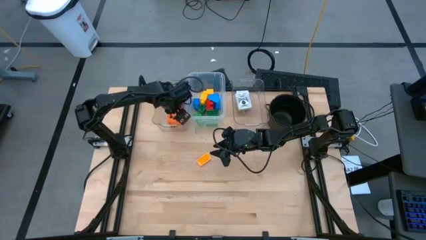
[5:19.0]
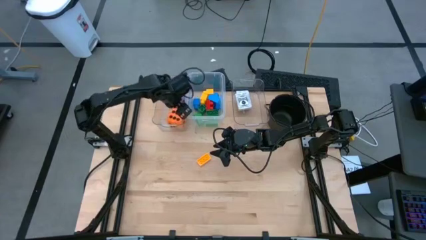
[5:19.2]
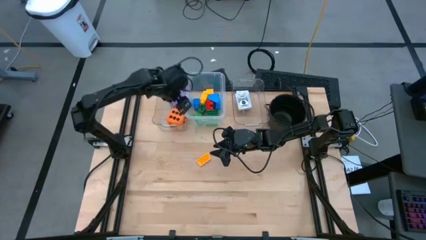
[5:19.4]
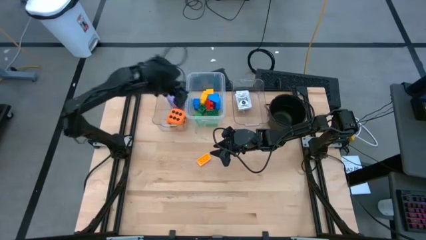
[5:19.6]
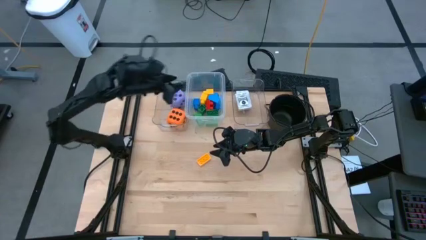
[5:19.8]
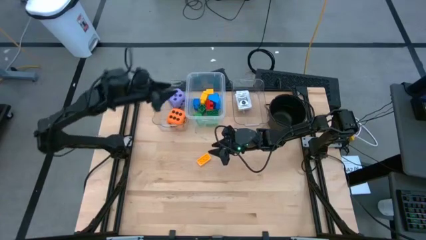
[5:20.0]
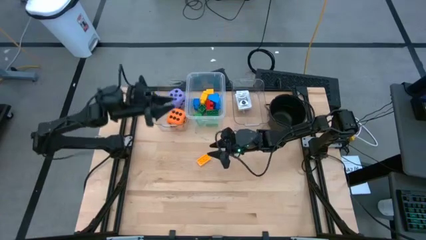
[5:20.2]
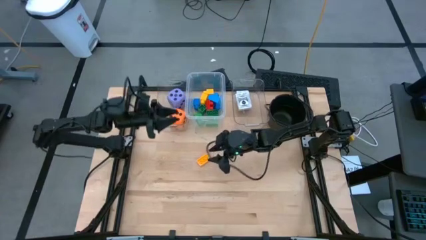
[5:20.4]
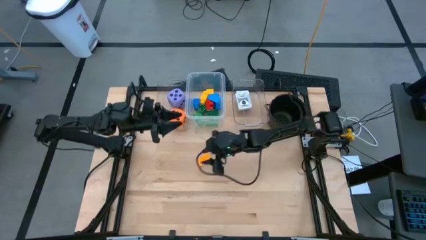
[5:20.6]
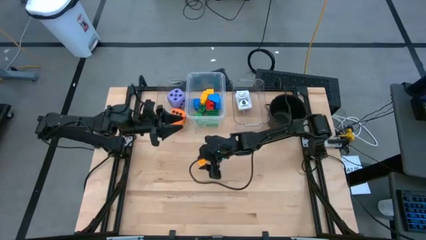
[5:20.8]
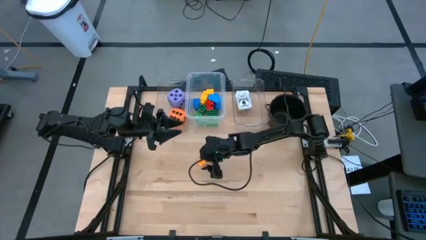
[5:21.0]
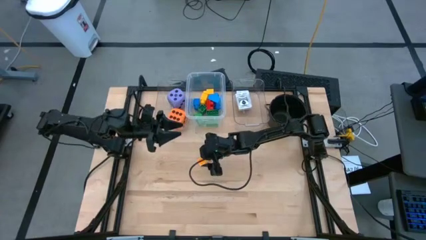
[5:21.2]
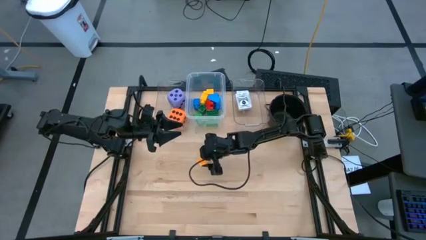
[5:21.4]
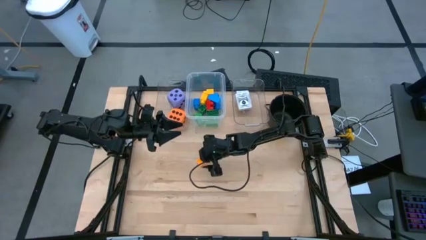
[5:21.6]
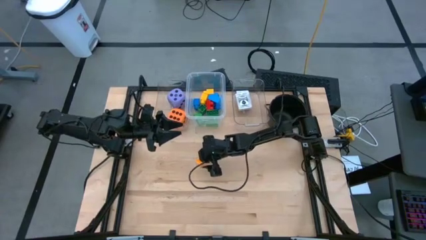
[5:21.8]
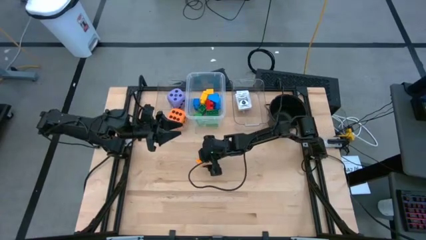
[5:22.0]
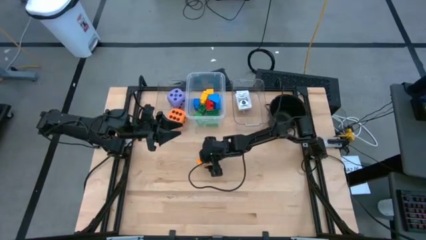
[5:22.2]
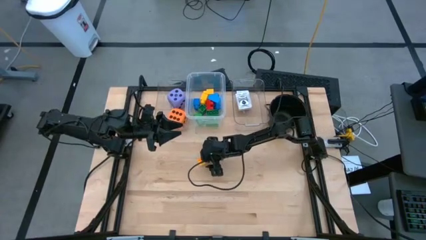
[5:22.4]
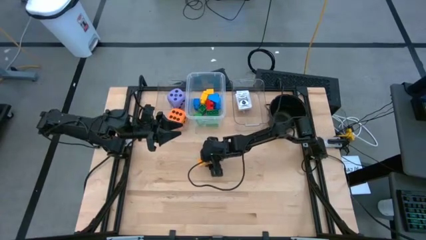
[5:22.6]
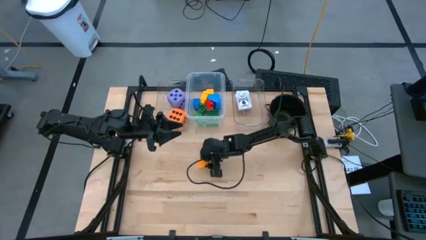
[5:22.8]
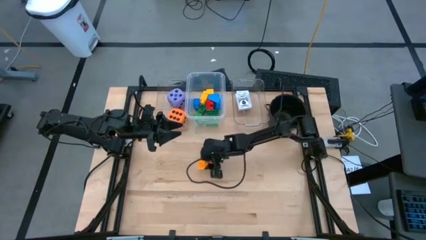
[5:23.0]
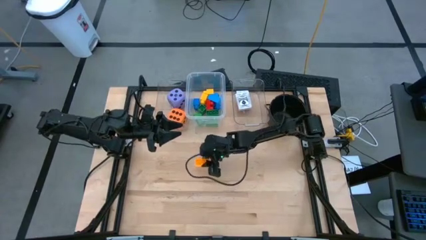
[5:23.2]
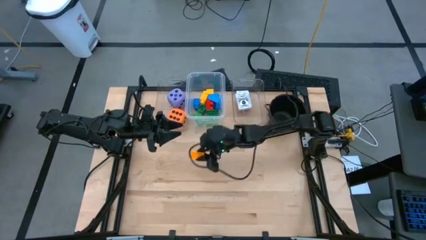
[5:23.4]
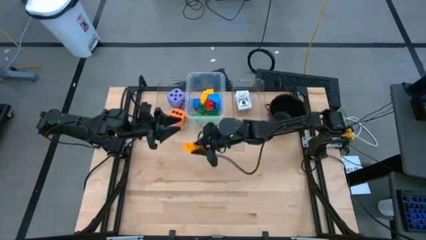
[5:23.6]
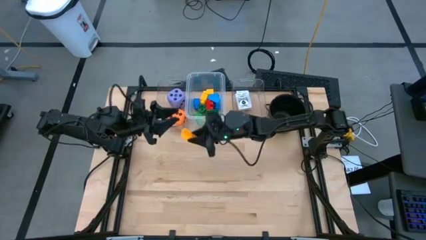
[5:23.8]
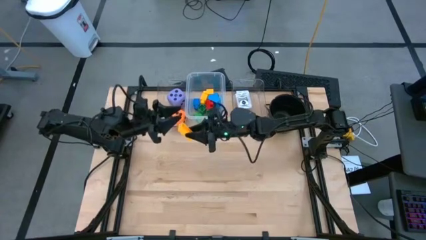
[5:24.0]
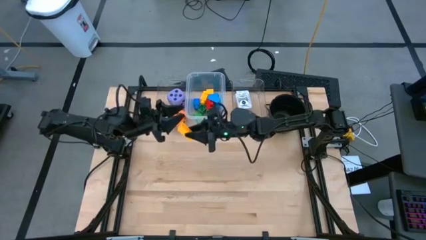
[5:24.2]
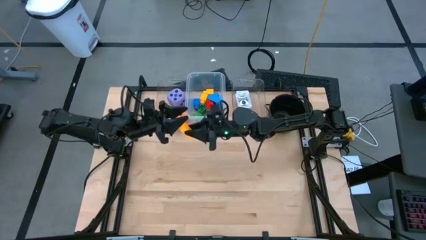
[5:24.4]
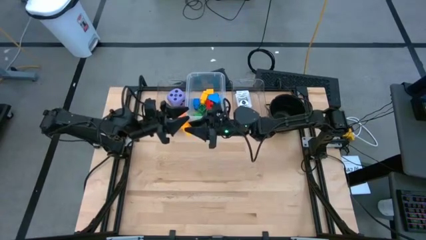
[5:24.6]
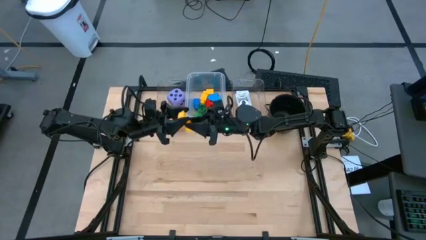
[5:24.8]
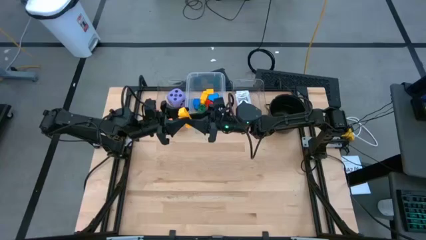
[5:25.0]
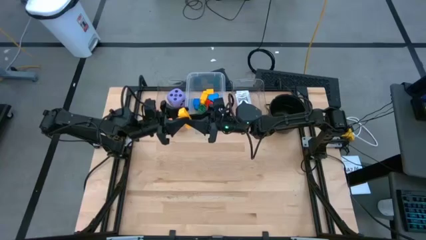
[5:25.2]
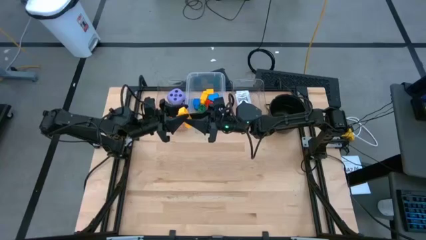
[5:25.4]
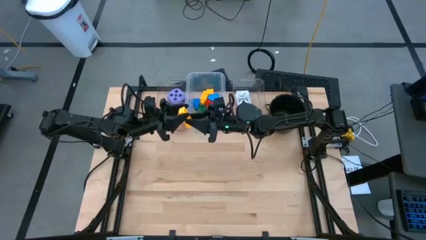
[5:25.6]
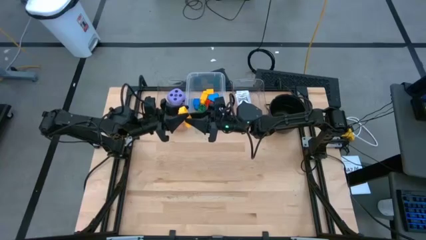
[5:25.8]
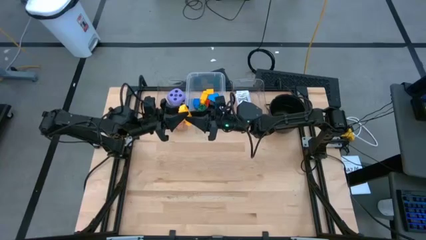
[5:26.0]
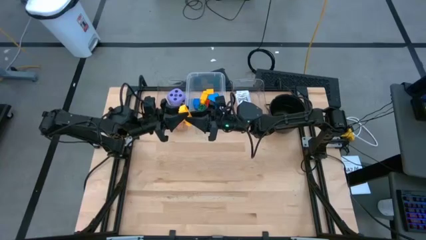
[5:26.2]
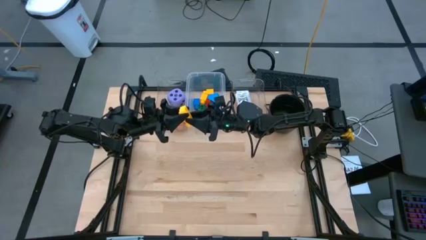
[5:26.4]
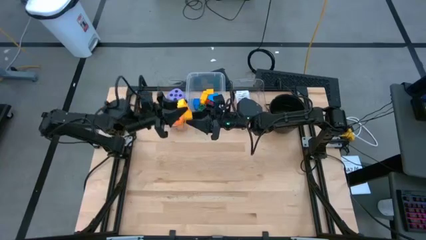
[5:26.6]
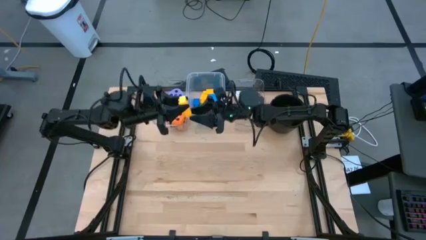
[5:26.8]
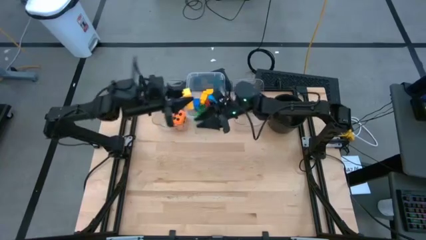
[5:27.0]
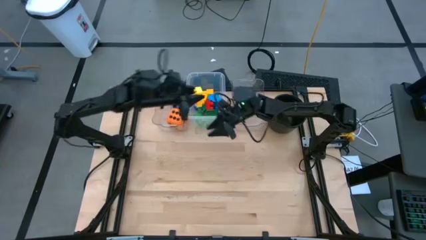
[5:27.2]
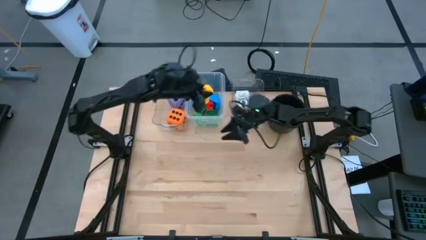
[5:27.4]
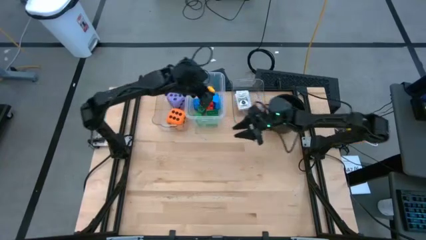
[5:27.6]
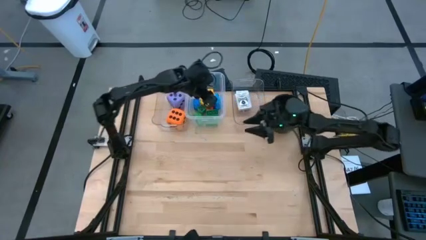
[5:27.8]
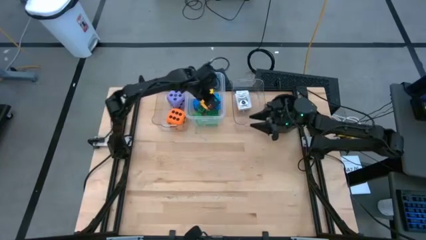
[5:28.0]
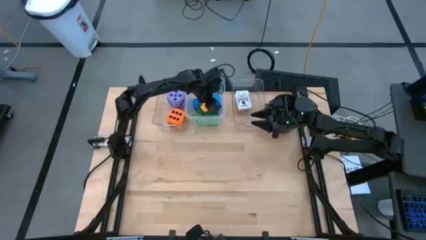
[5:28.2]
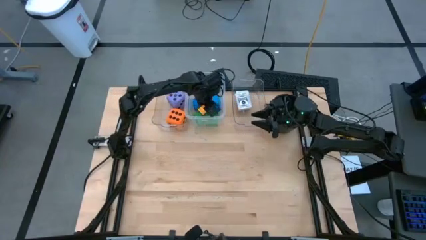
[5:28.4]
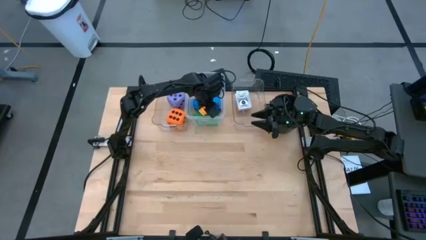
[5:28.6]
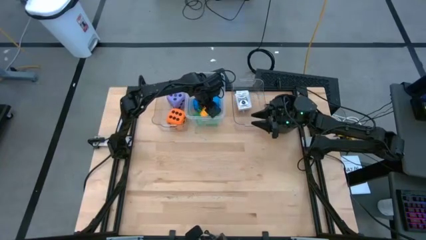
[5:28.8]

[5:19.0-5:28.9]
Task: Pick & Place Toys
Put the yellow eight stud game piece into the middle transparent bin

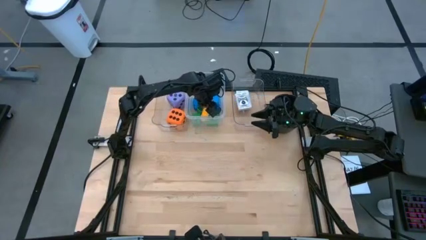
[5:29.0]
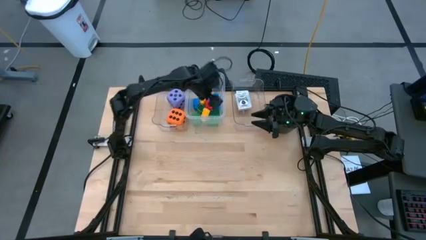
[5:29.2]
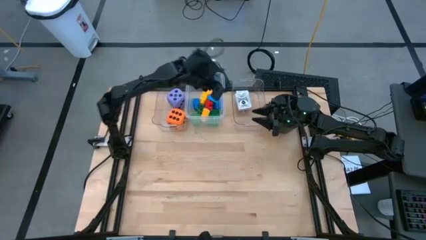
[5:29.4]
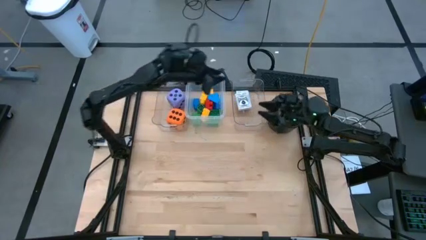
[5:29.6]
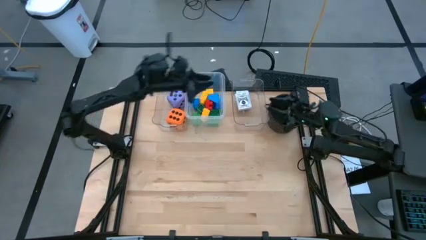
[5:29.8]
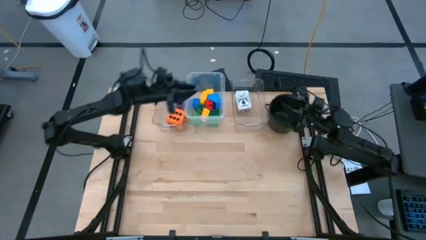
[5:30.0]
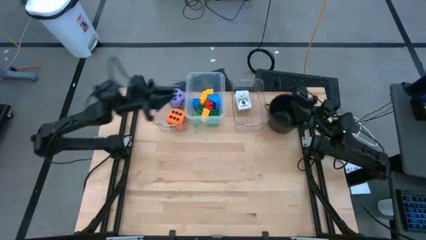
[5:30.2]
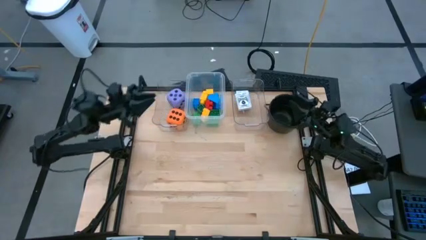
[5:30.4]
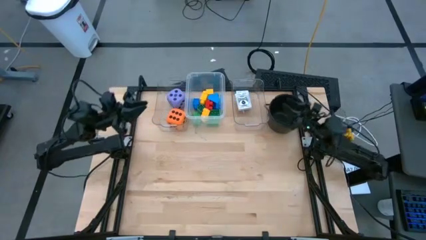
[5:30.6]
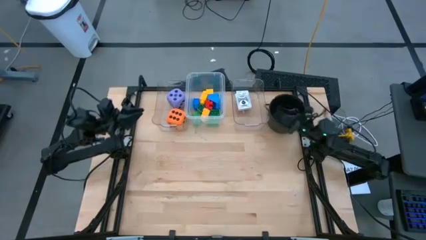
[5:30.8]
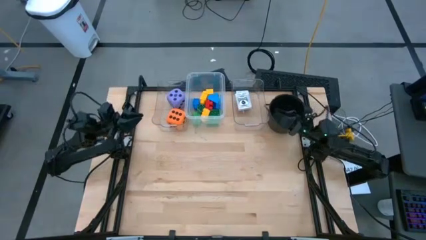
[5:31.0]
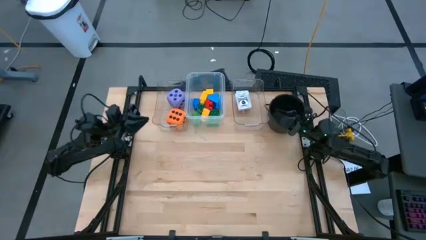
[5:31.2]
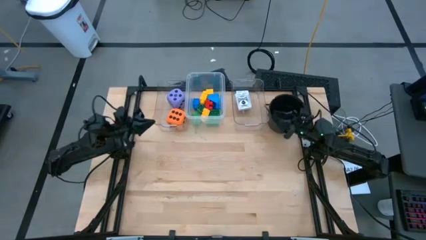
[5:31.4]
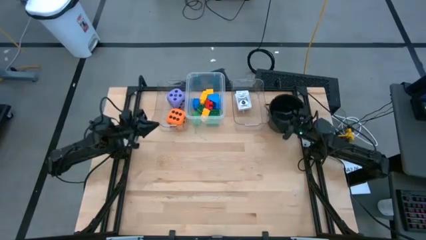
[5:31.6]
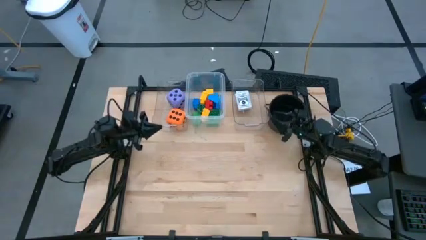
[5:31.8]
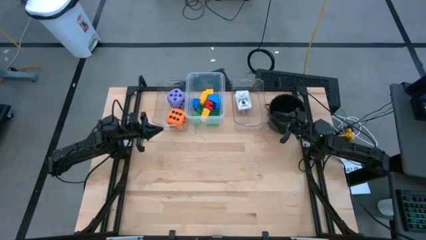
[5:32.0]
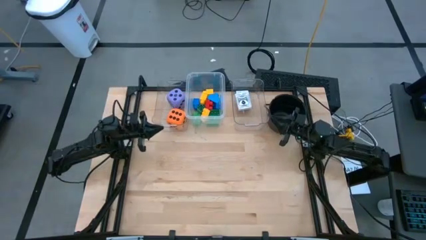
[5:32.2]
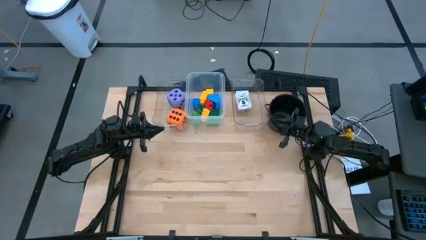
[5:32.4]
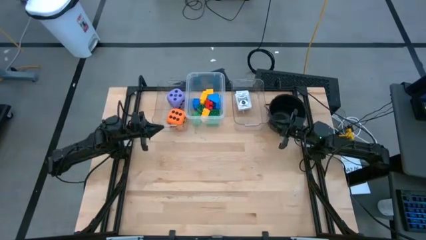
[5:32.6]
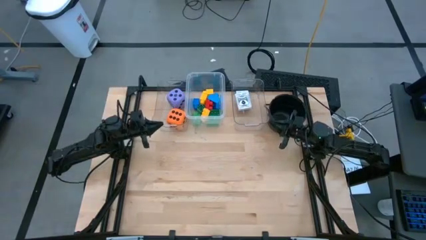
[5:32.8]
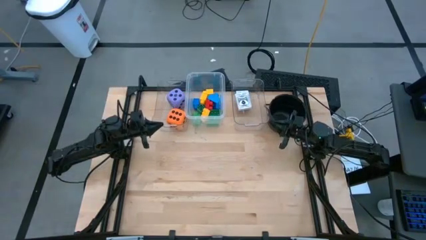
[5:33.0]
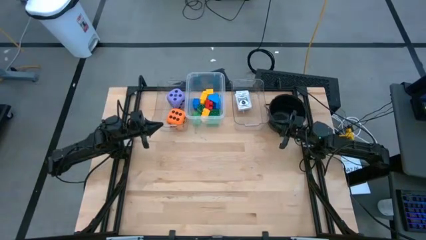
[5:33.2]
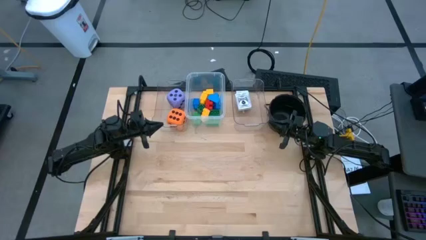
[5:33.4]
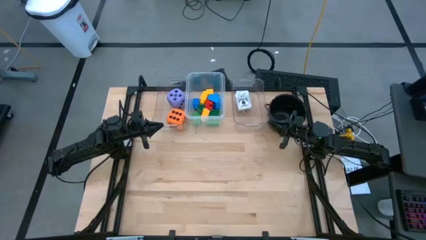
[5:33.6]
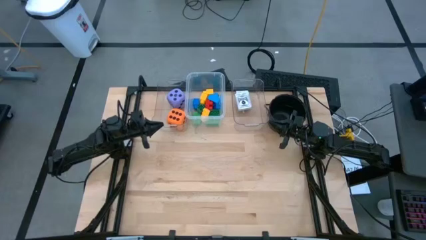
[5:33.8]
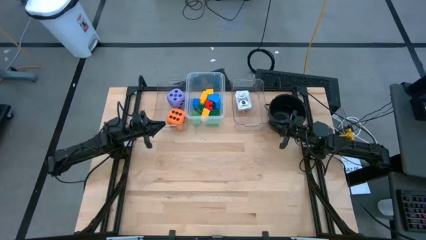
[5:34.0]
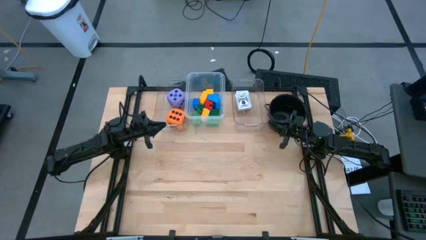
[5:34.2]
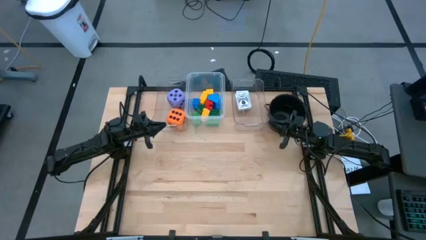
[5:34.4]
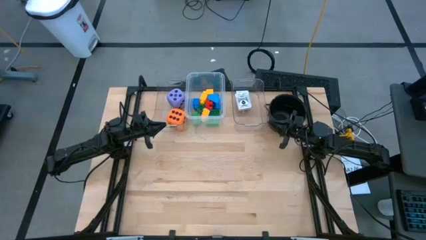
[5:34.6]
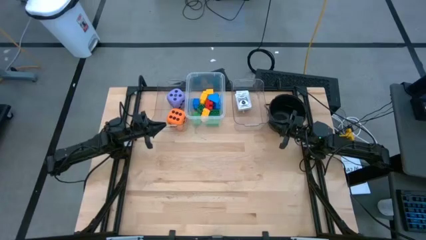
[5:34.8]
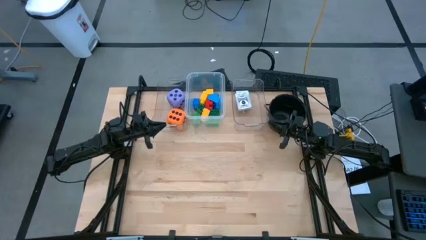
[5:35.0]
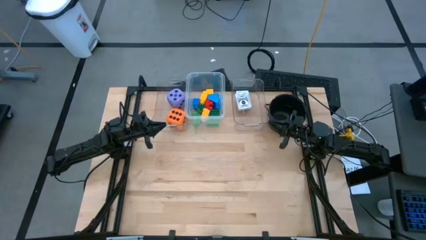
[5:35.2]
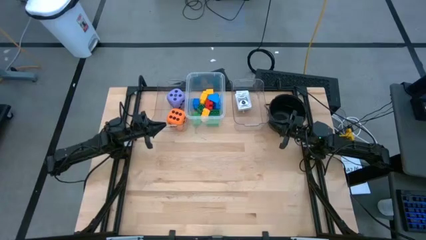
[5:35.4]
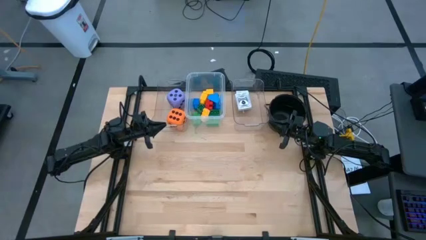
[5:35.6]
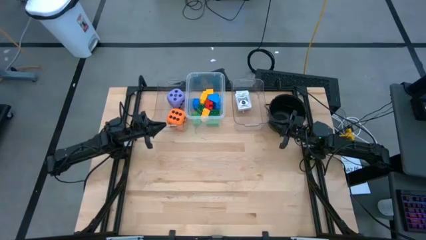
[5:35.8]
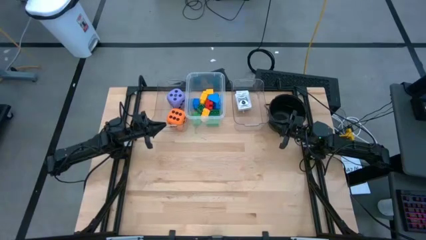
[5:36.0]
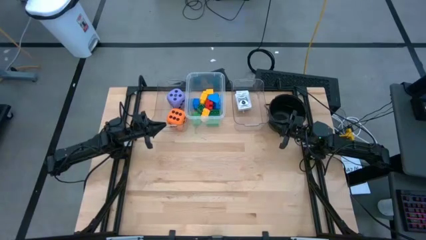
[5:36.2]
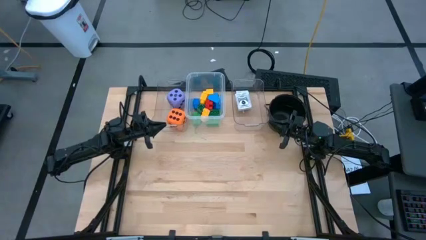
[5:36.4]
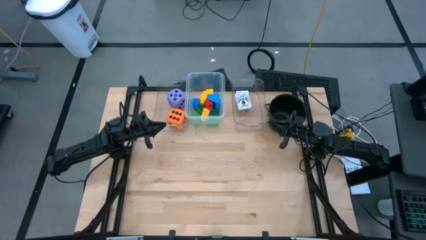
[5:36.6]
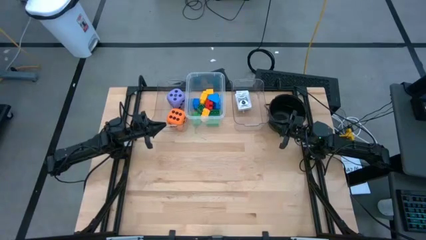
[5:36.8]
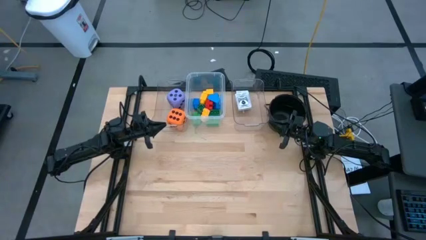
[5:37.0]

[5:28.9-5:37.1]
Return to Home Position
